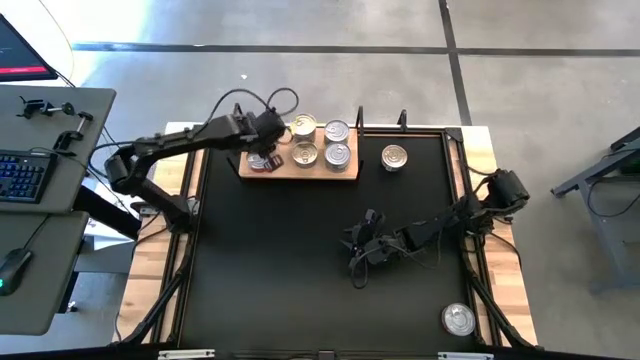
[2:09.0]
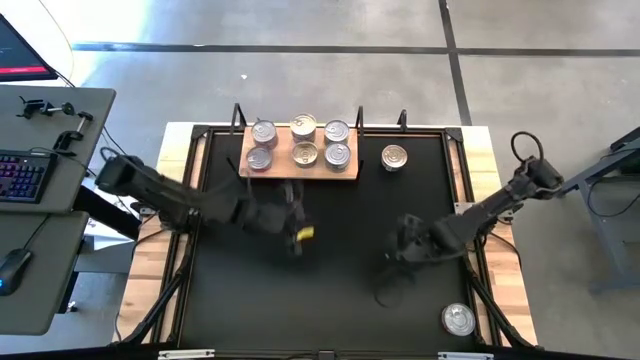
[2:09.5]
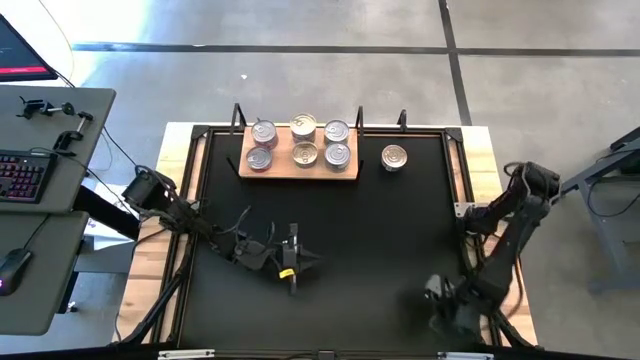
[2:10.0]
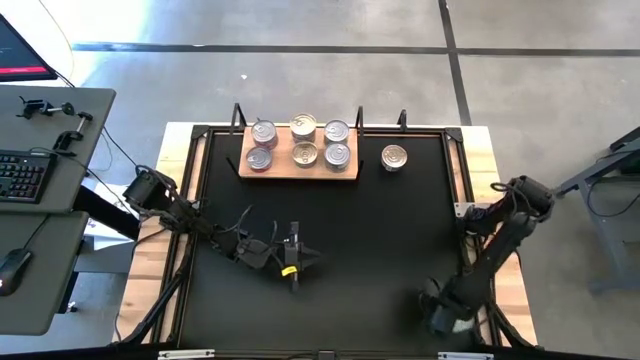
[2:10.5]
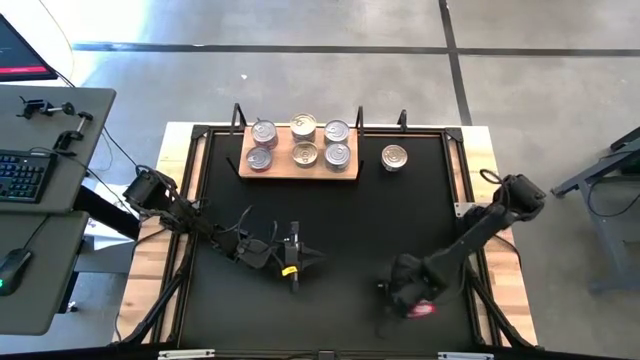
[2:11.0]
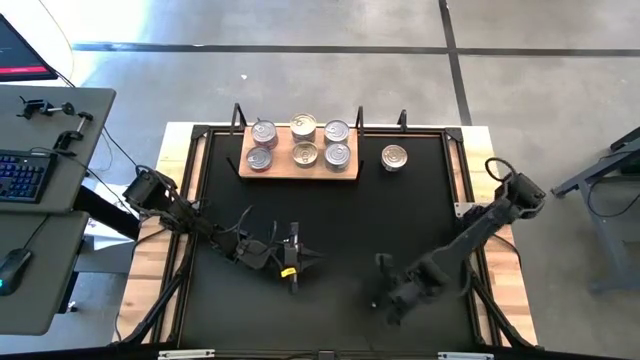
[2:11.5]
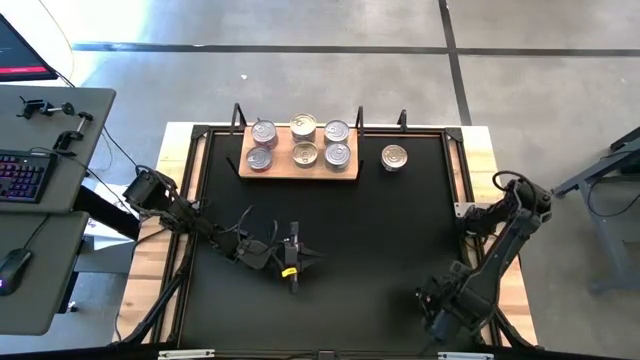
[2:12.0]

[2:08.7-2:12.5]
Task: Stack canned seafood by type on shelf
Stack the red tuna can on top of the red tuna can on the shelf

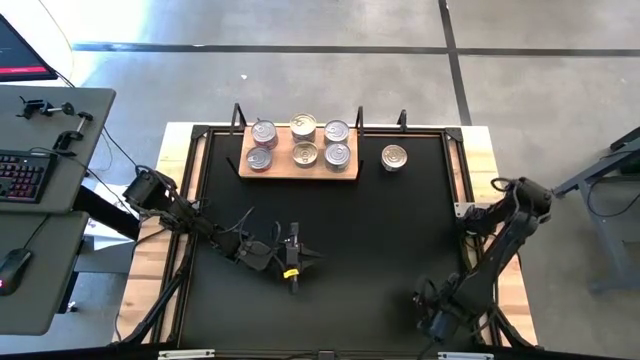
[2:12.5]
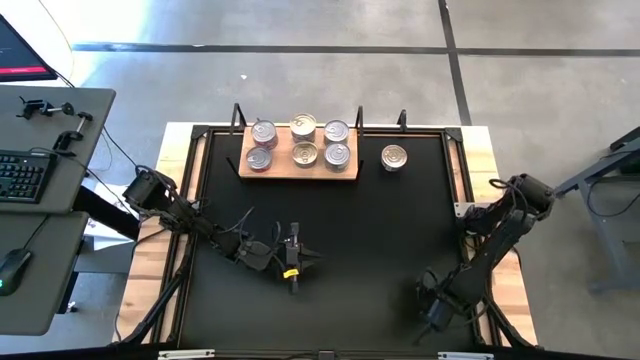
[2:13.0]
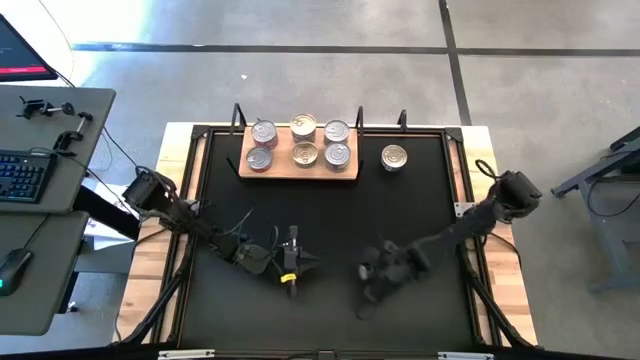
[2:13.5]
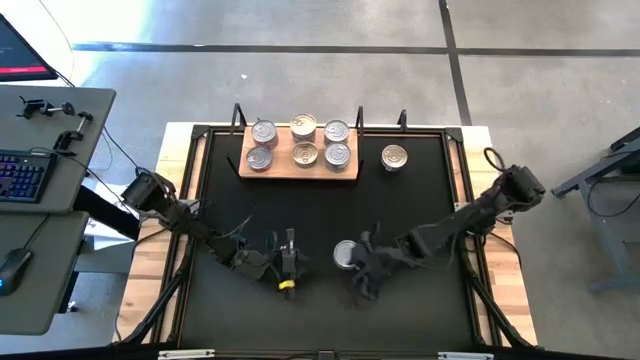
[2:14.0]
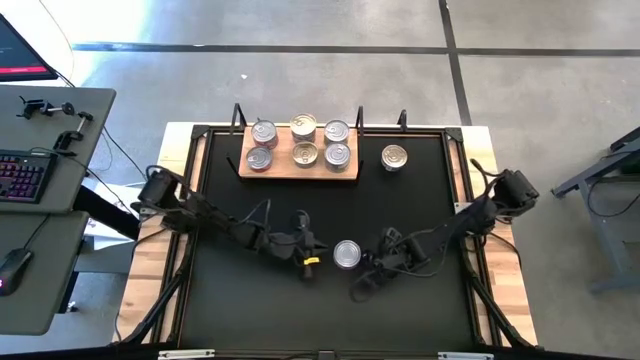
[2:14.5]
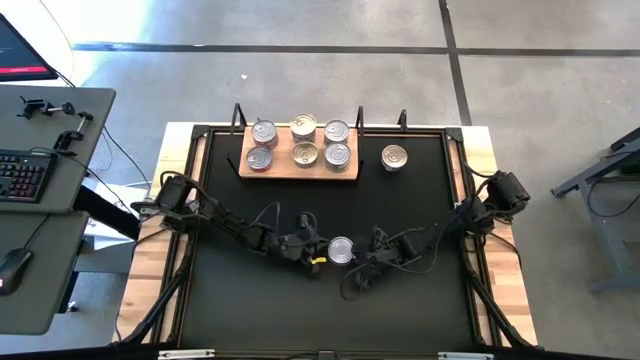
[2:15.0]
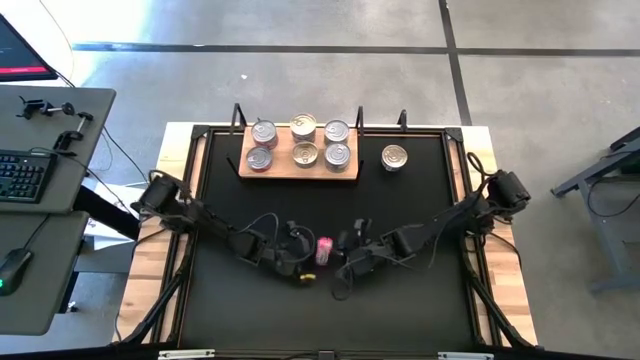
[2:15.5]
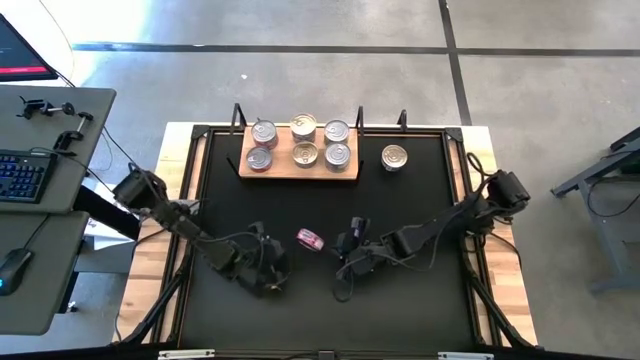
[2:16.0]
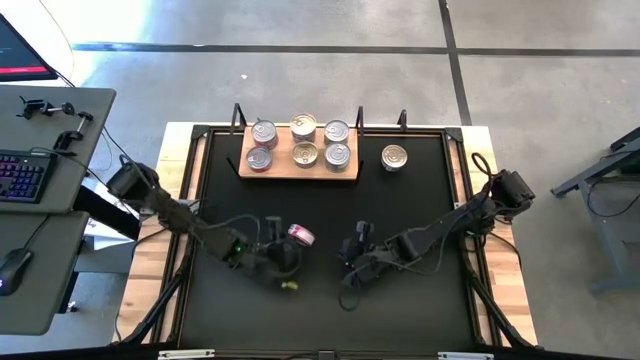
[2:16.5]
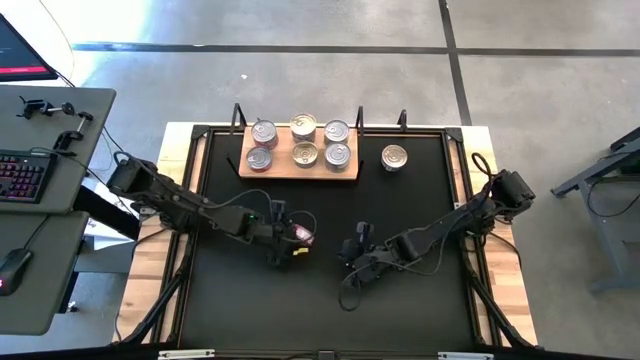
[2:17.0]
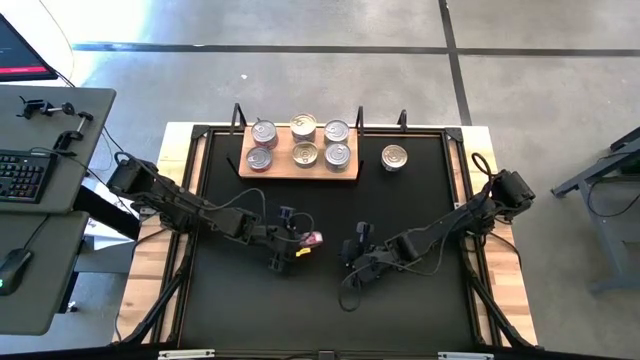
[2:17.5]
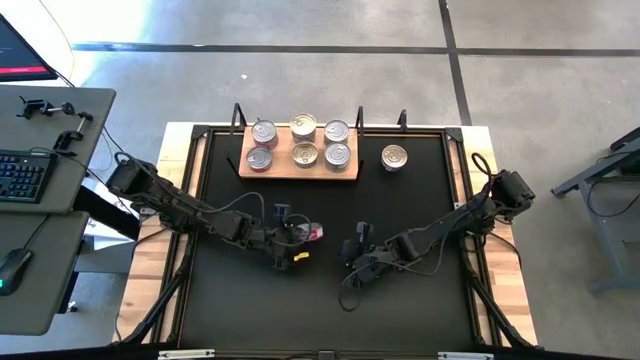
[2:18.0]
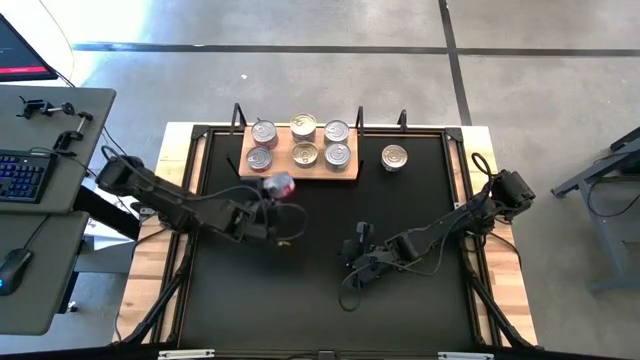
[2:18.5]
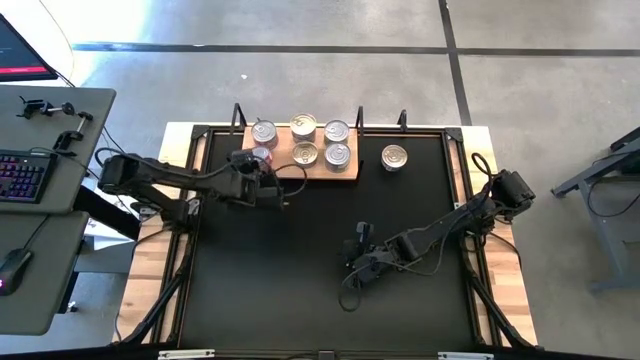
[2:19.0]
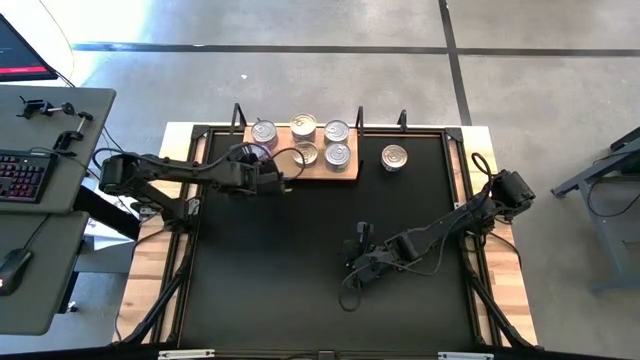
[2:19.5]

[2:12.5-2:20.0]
Stack the red tuna can on top of the red tuna can on the shelf

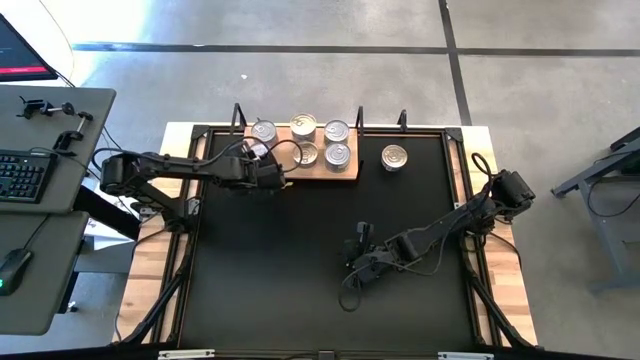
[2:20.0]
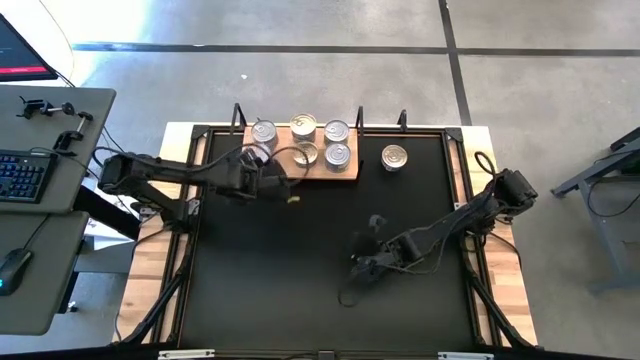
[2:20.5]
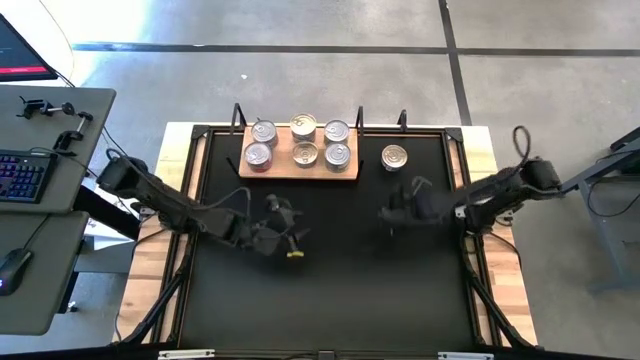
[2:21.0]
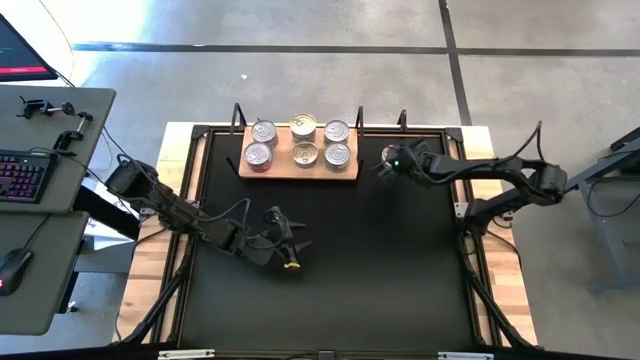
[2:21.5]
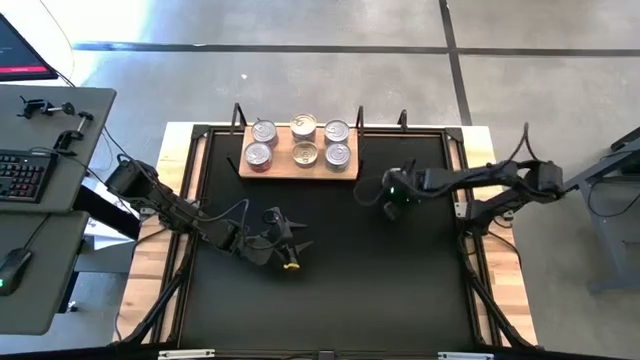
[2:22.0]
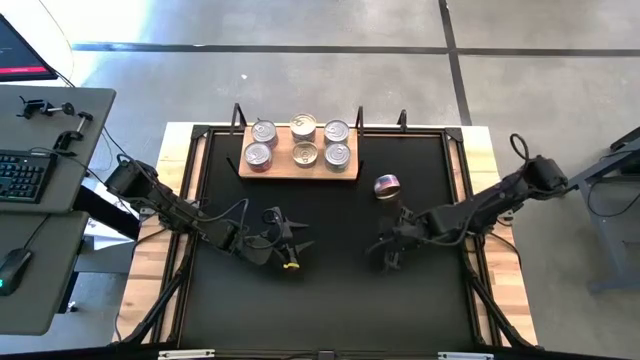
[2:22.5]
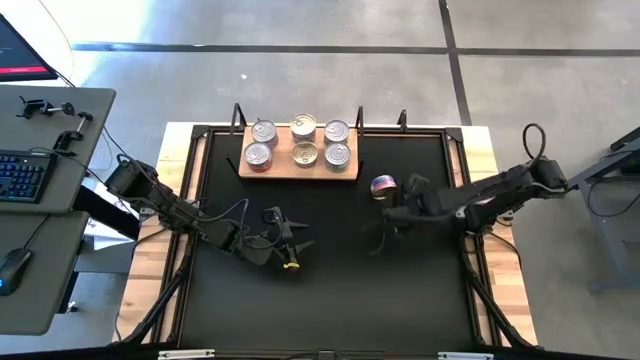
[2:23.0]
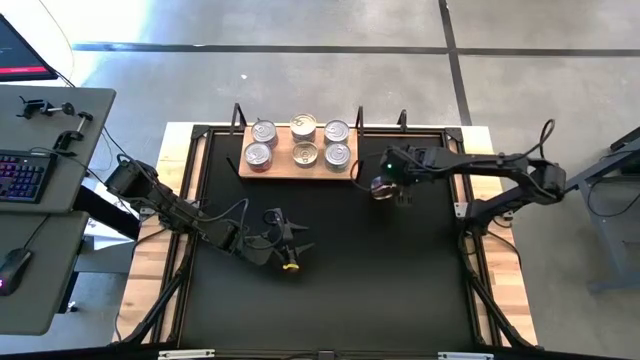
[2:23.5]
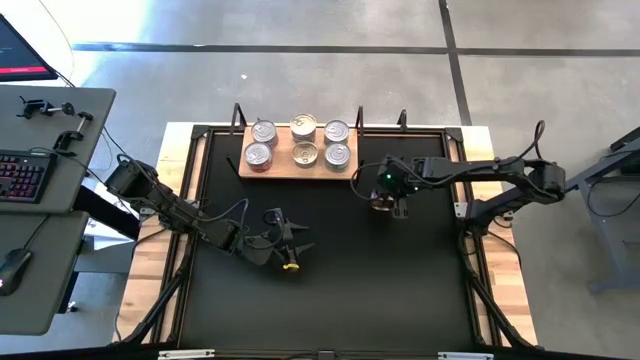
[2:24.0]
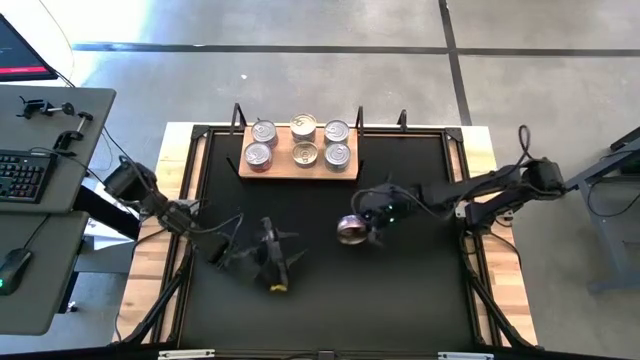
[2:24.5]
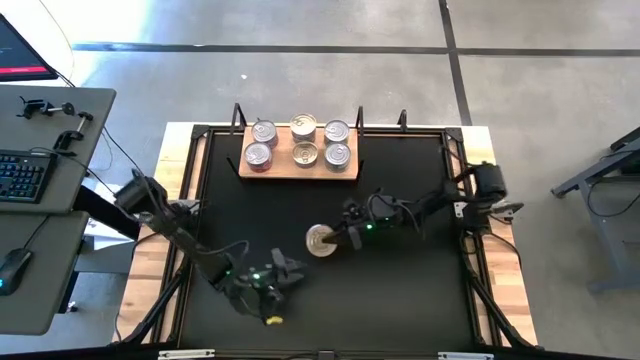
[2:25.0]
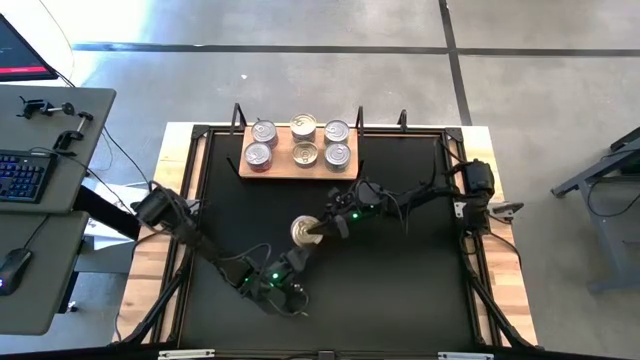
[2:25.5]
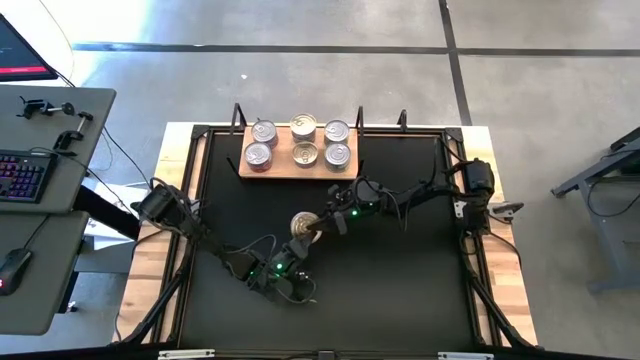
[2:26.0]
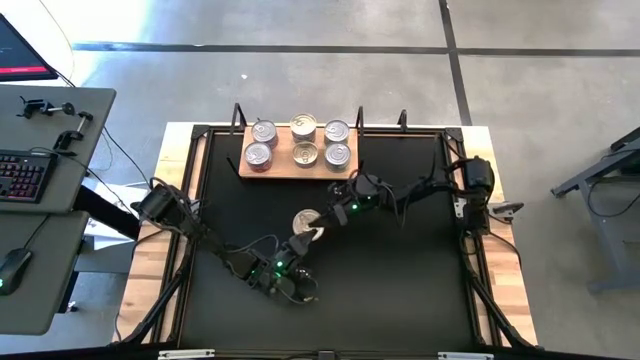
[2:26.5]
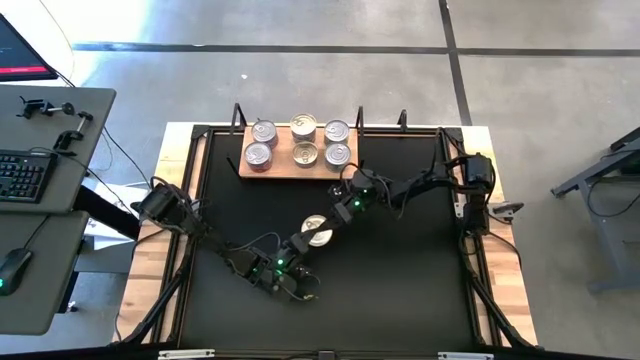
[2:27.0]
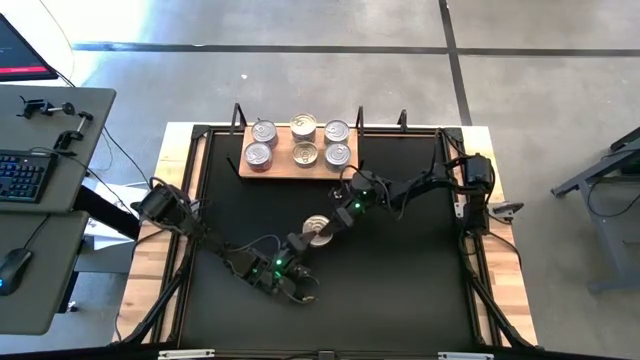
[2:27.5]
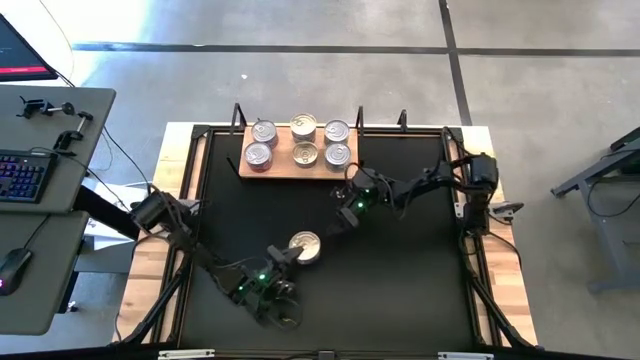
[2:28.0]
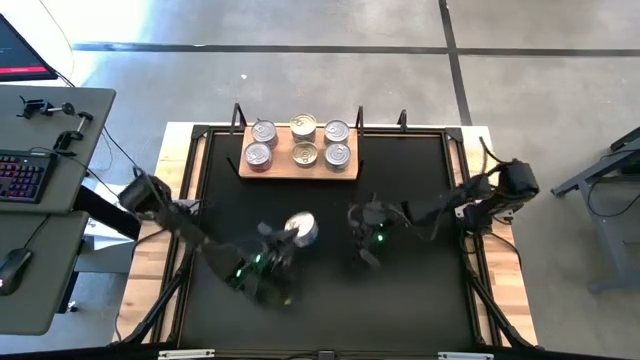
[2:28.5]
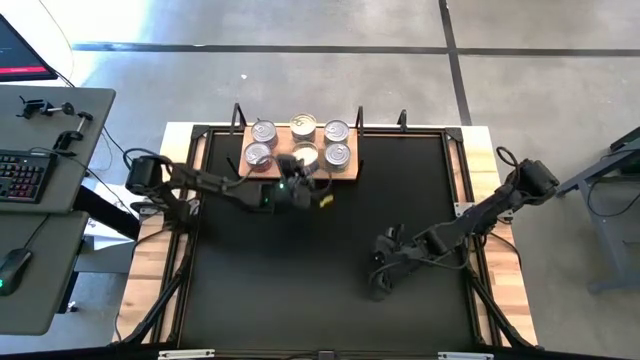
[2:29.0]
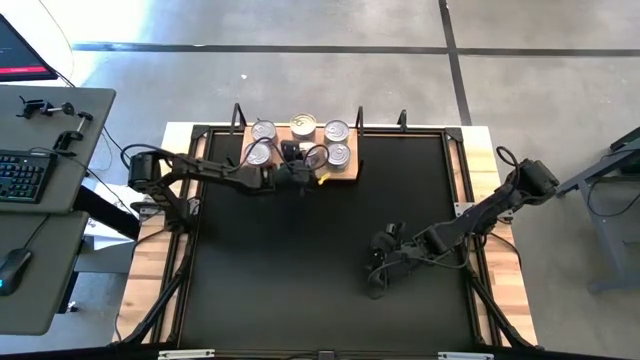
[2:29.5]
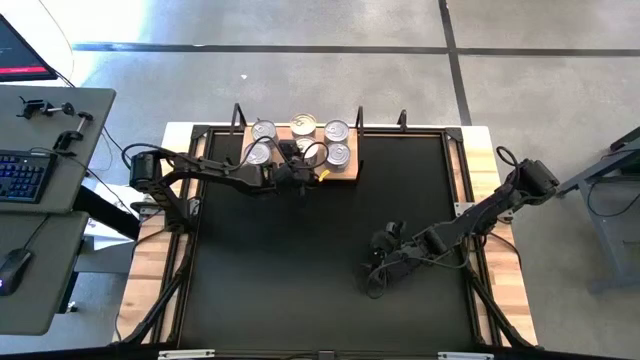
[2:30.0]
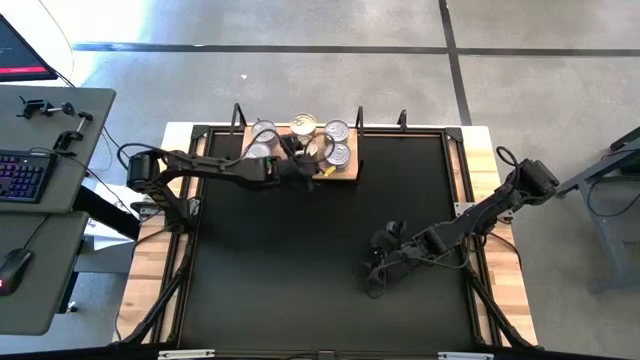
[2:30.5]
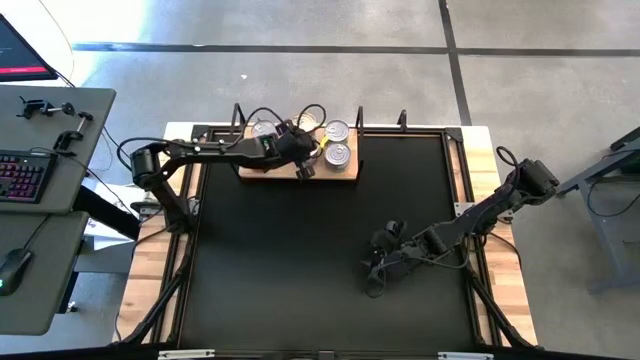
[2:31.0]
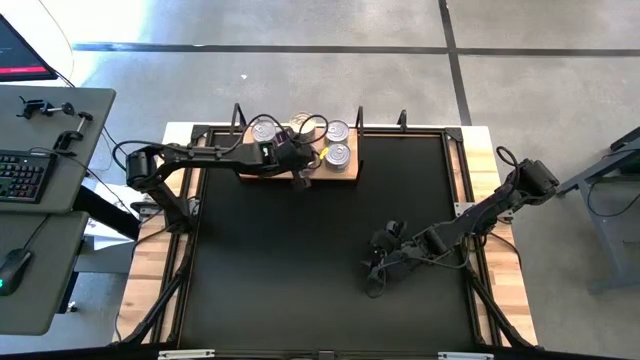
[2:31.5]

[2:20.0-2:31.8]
Stack the blue and pink tuna can on top of the blue and pink tuna can on the shelf
